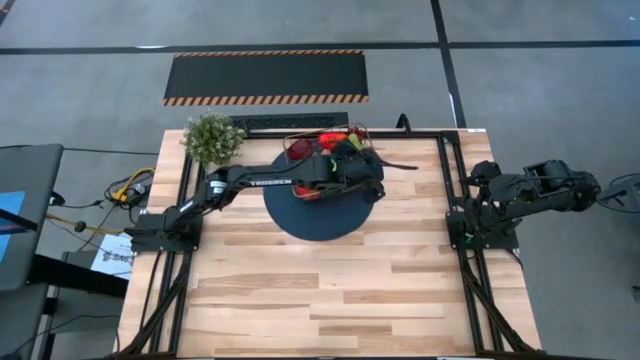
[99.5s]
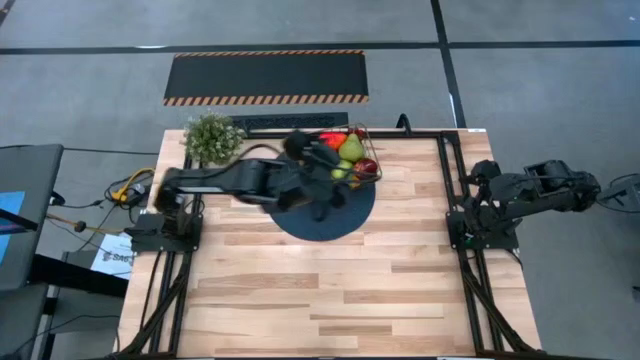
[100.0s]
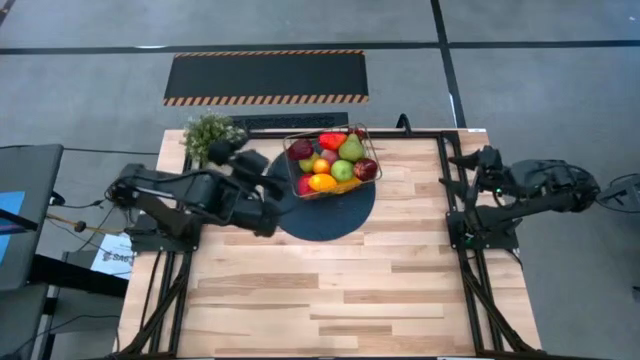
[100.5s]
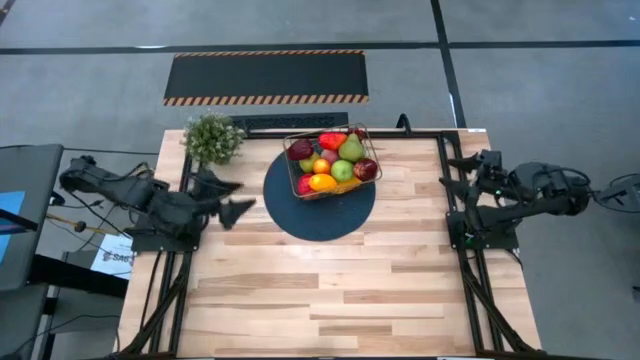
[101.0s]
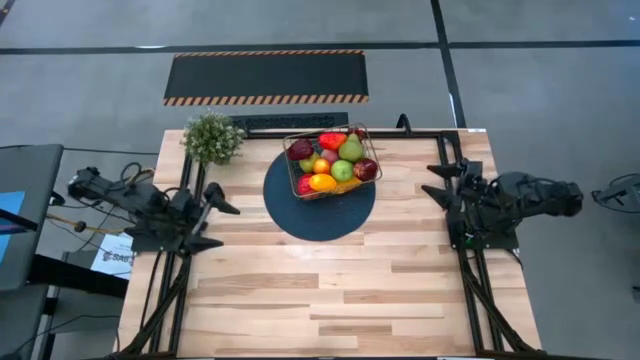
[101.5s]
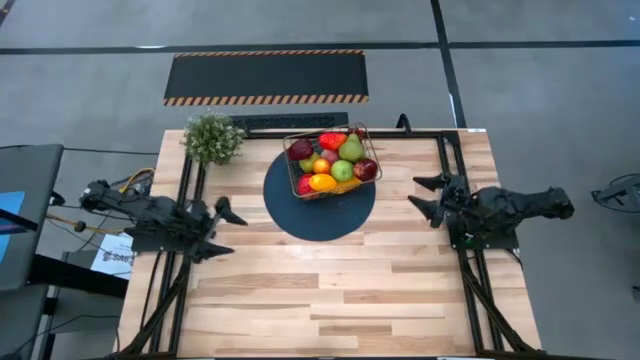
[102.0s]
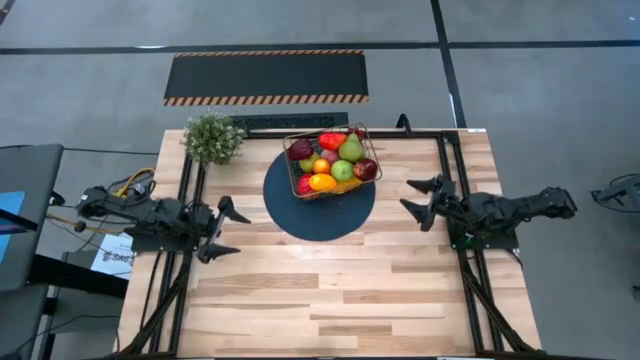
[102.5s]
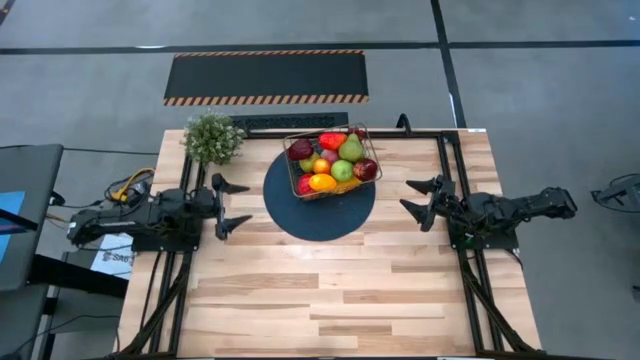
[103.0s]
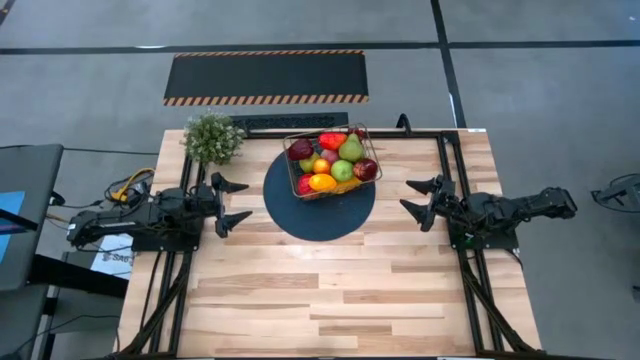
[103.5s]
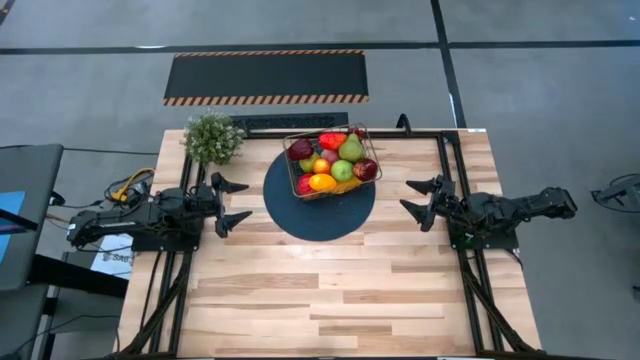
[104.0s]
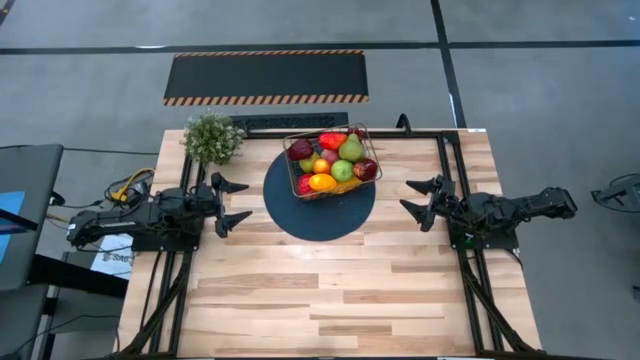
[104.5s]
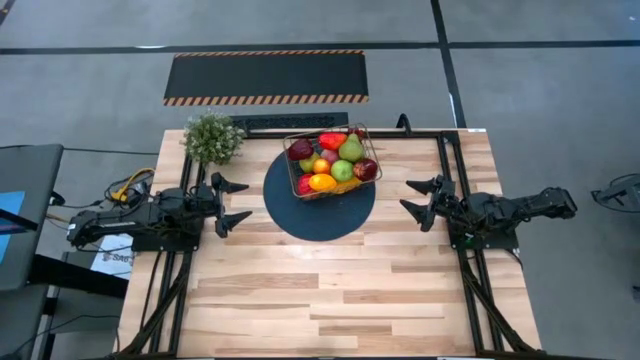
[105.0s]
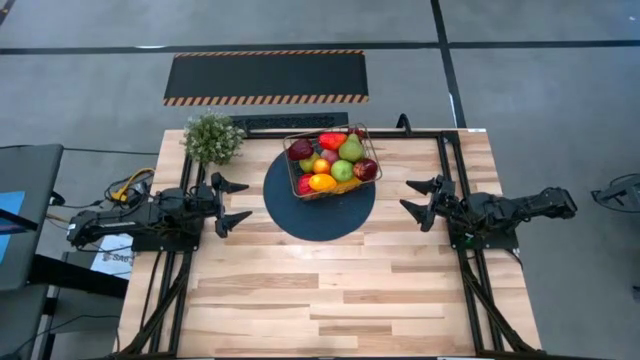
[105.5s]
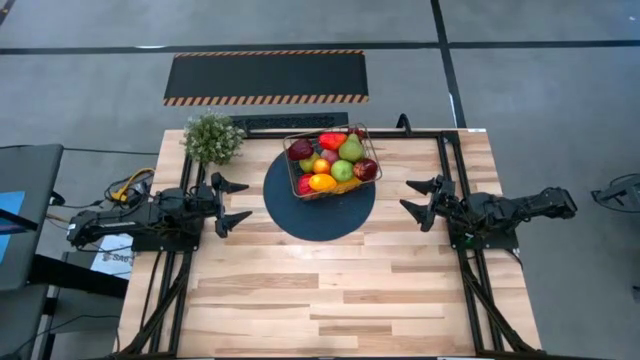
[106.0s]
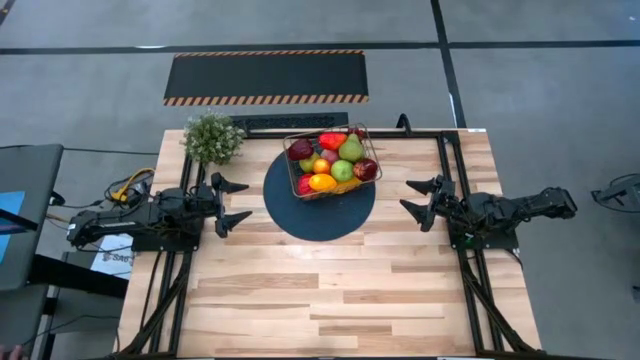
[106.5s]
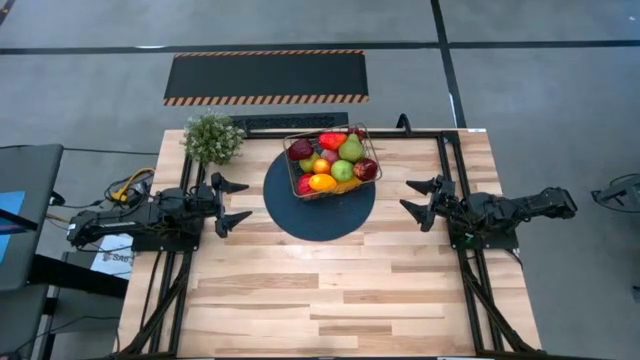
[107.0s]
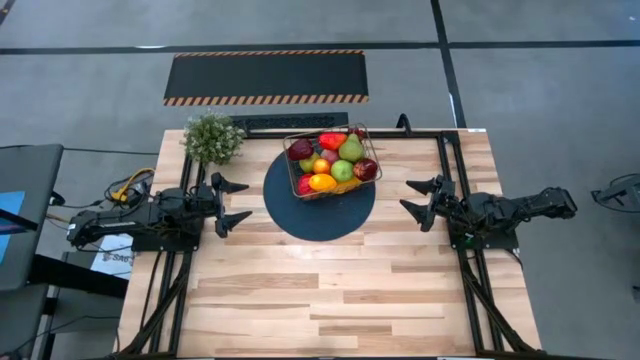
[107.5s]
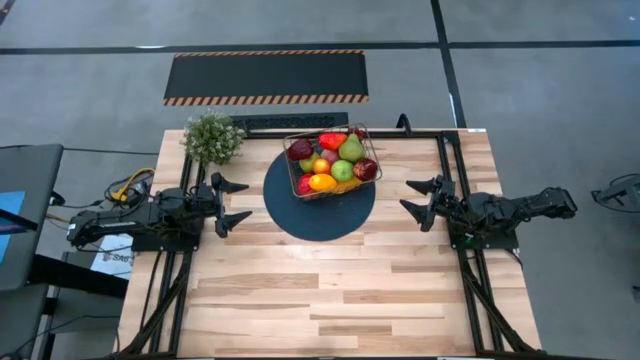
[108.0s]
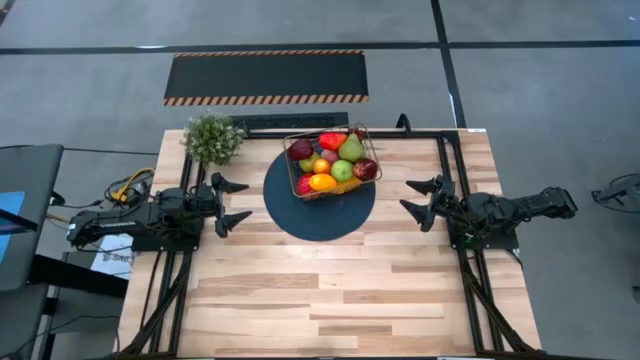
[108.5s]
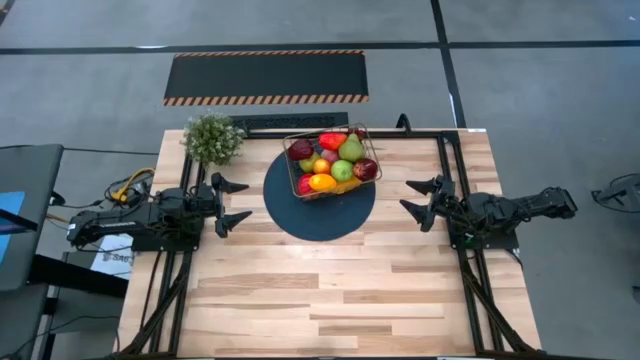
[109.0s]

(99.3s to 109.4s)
Task: Build produce basket
Return to Home Position

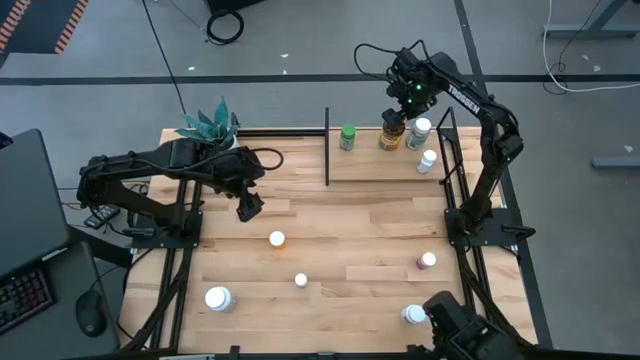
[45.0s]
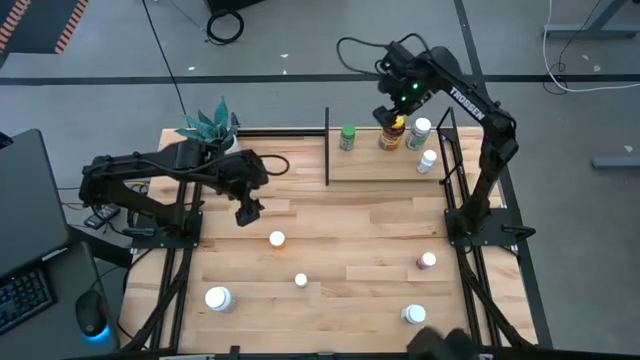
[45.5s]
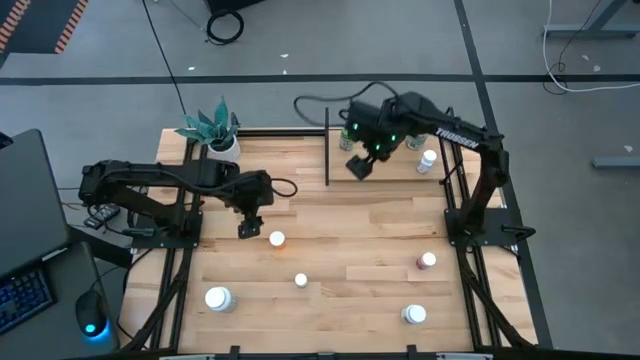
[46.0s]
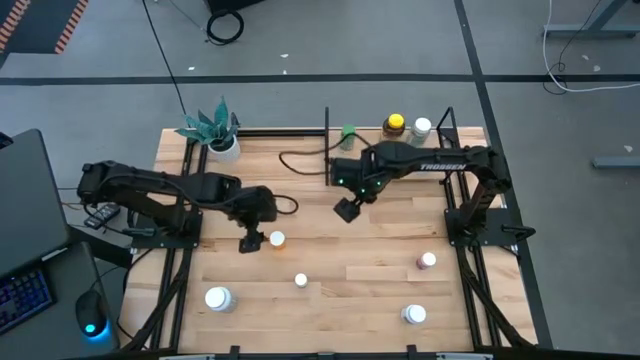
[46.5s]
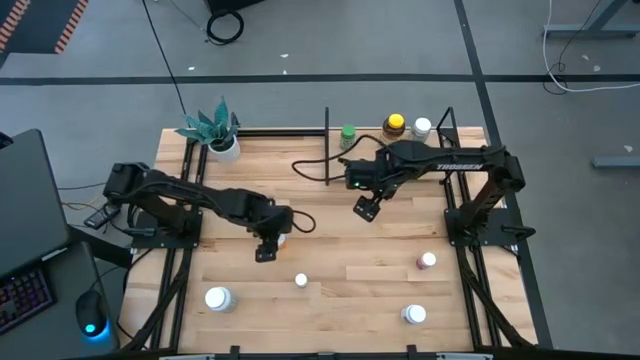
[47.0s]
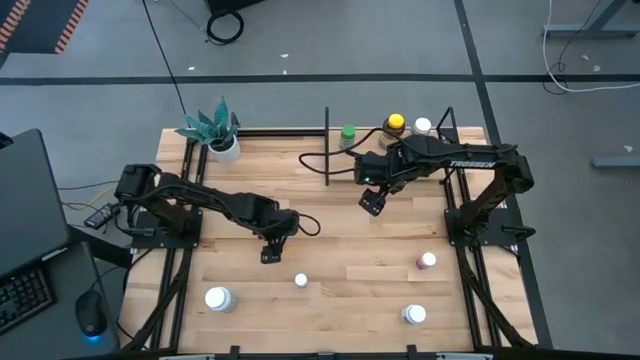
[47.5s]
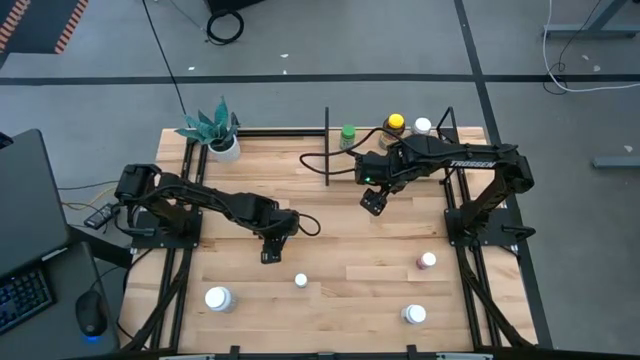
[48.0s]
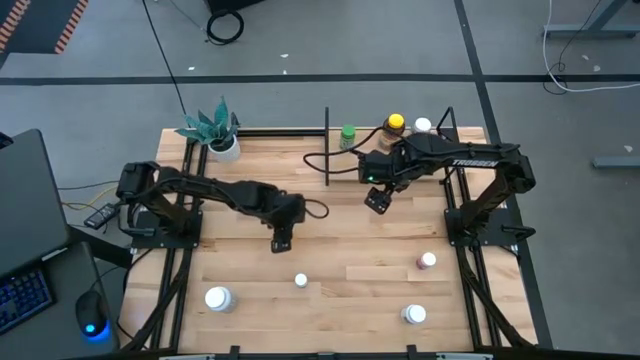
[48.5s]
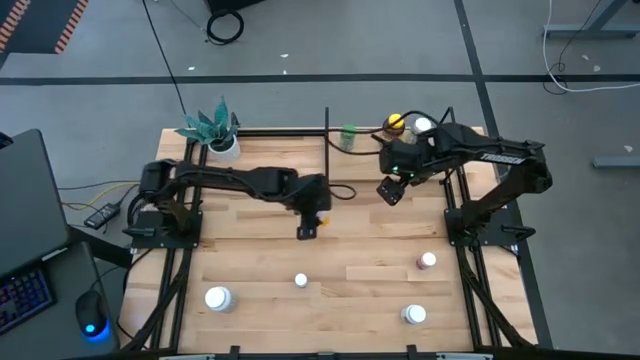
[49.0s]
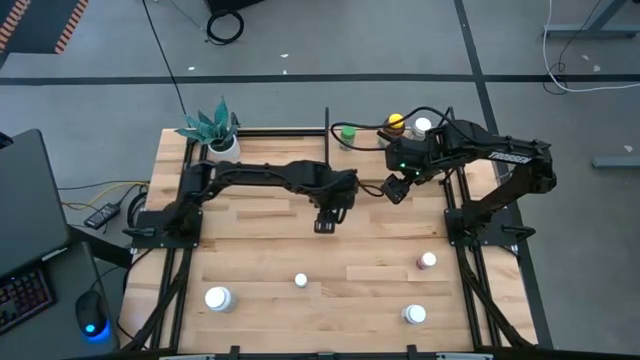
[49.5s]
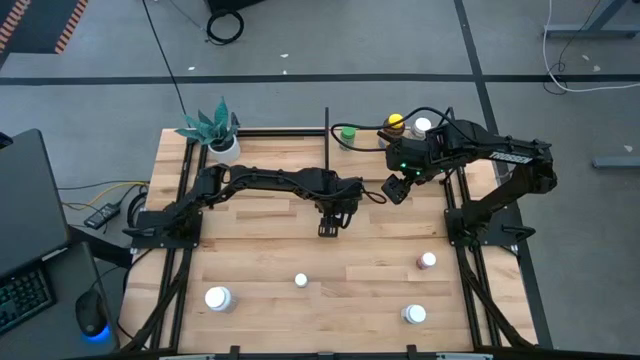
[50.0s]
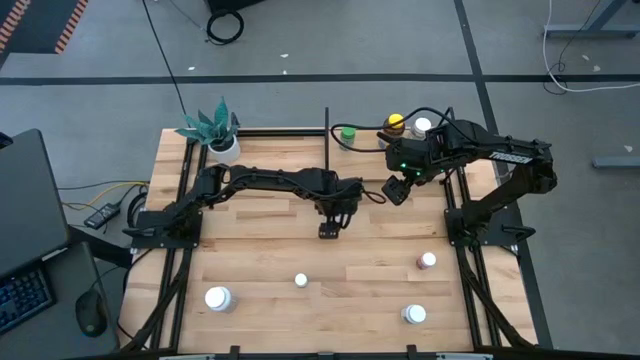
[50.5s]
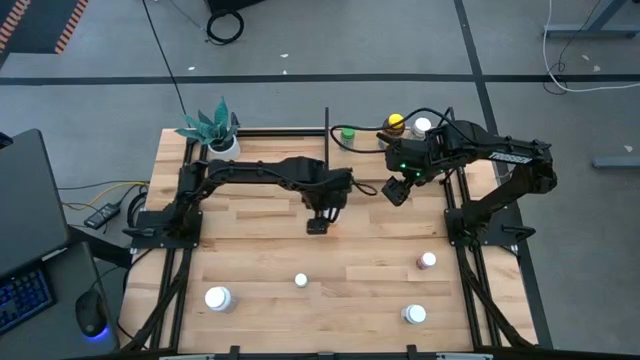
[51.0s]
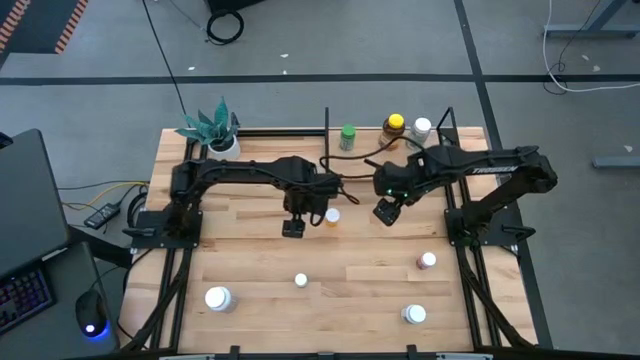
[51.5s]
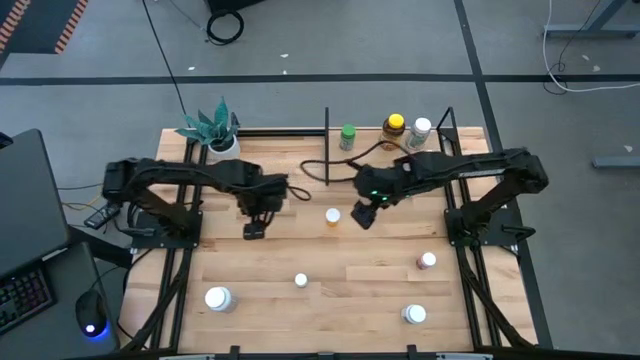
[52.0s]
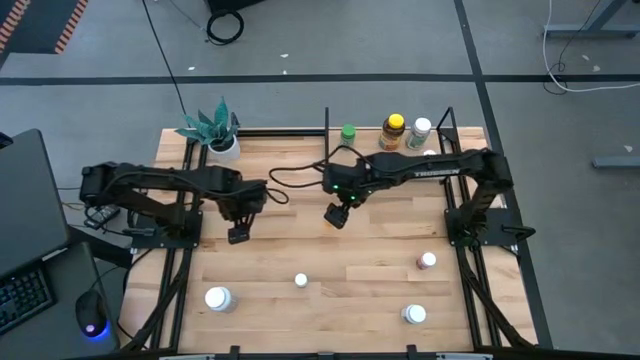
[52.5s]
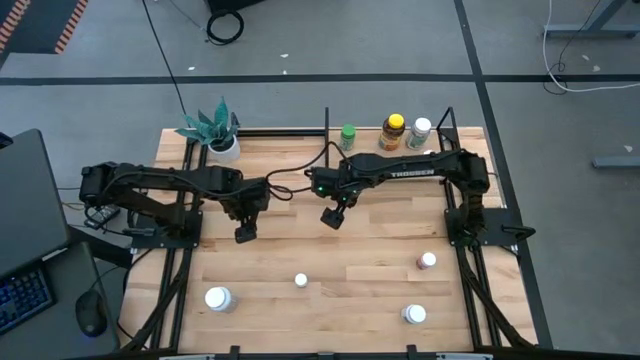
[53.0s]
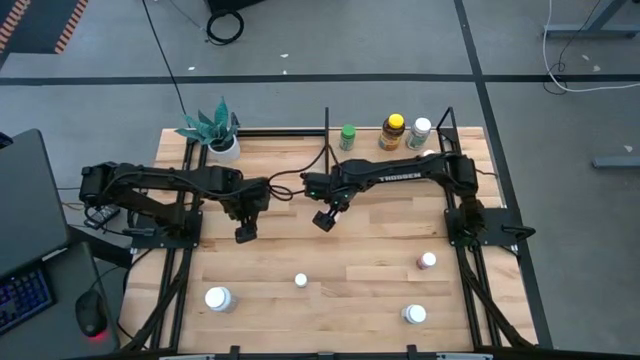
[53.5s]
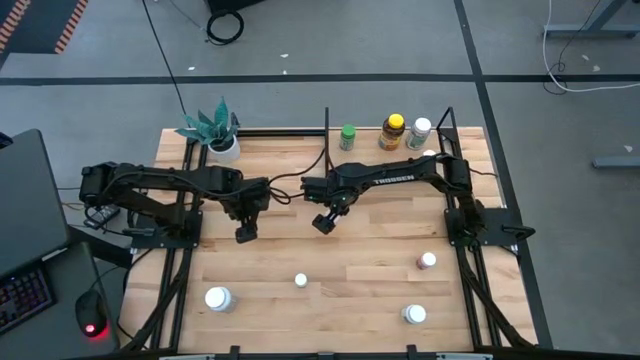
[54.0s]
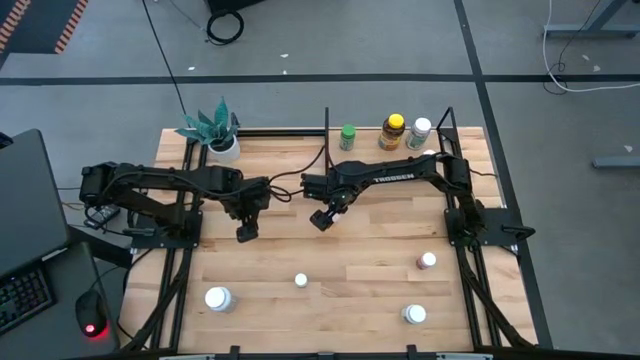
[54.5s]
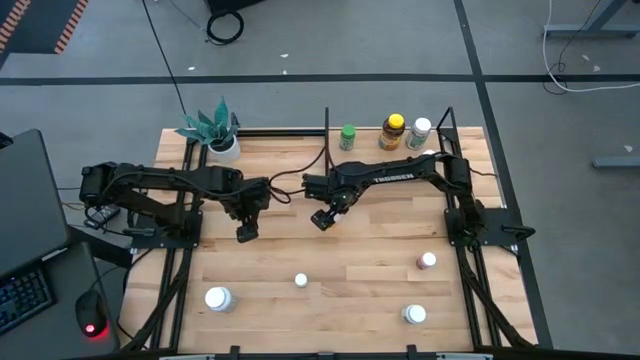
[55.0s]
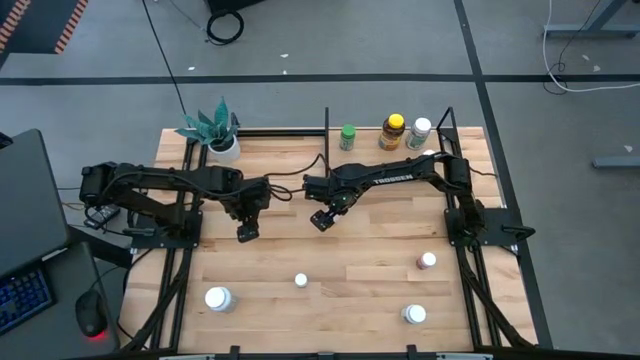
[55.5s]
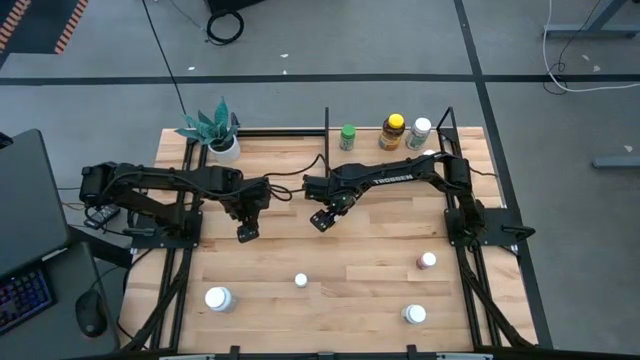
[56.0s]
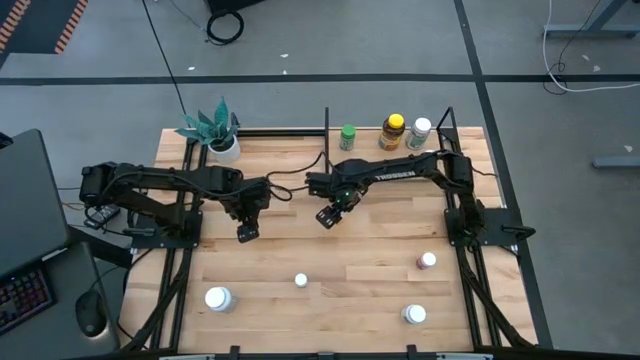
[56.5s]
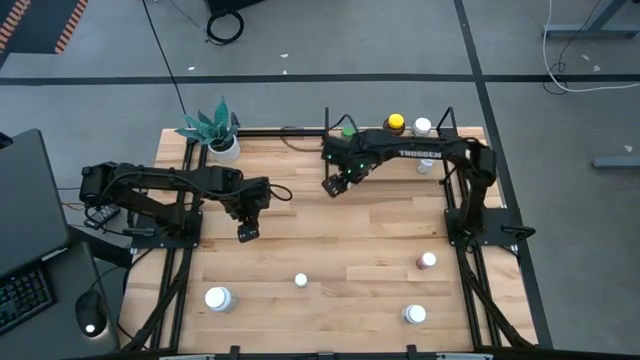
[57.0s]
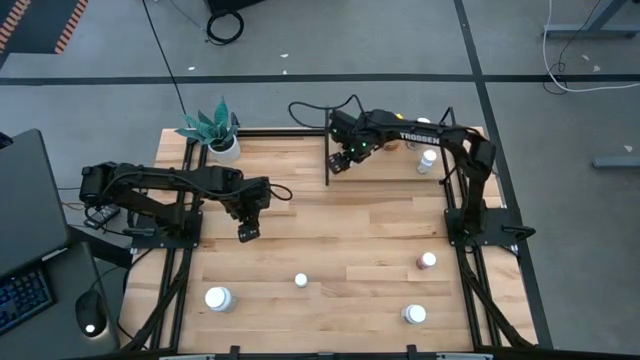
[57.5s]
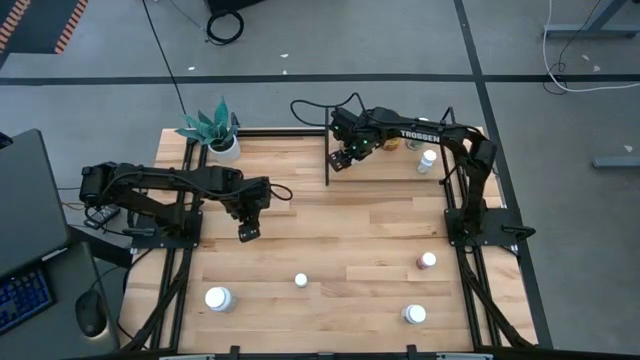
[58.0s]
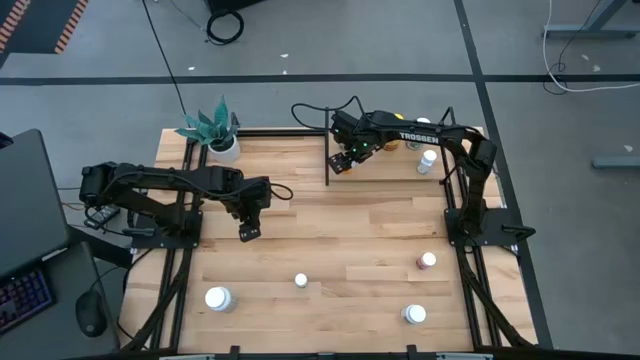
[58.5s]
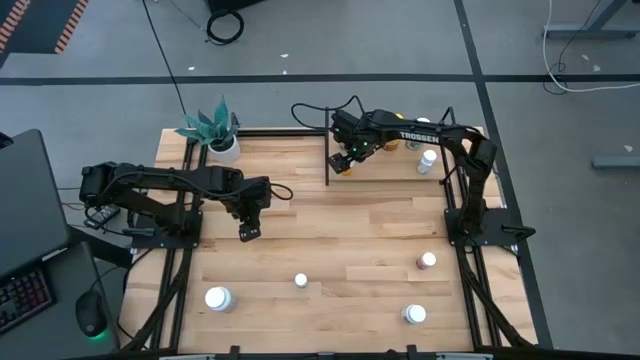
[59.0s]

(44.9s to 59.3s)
Task: Pick and place medicine bottles onto shelf by color
Put the orange pill bottle on the shelf
